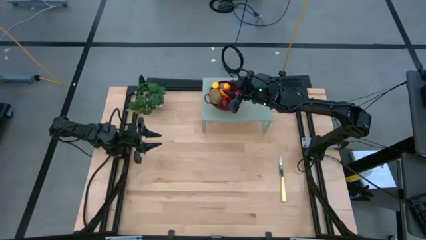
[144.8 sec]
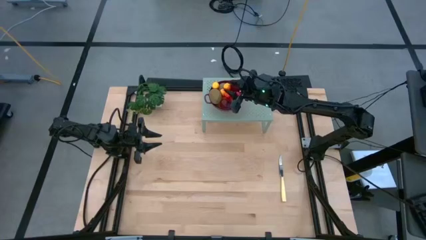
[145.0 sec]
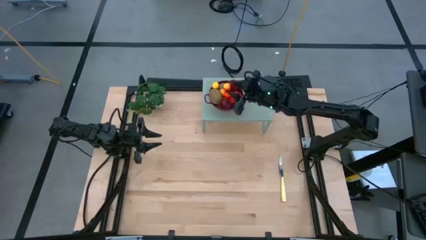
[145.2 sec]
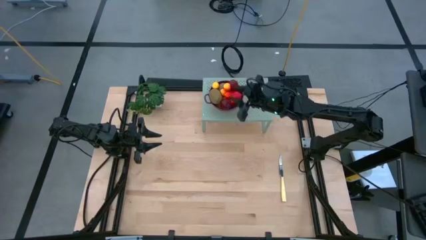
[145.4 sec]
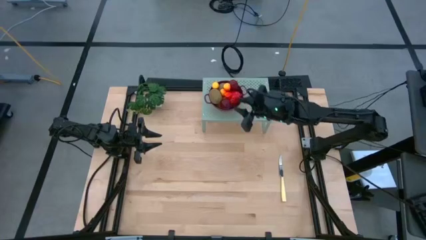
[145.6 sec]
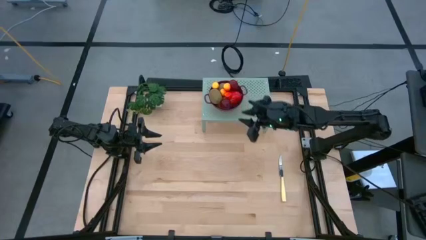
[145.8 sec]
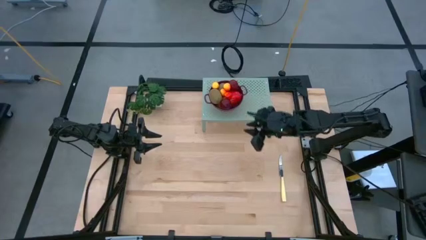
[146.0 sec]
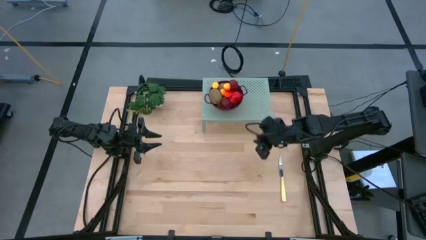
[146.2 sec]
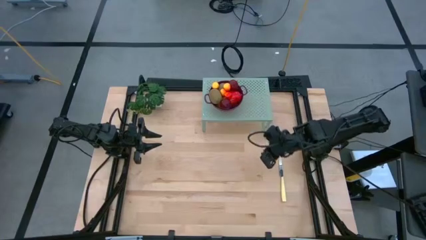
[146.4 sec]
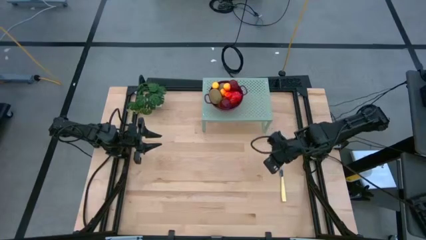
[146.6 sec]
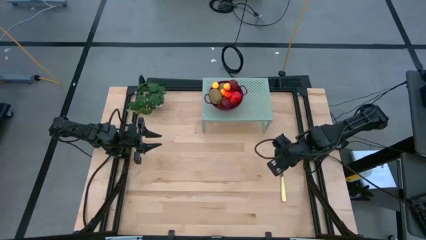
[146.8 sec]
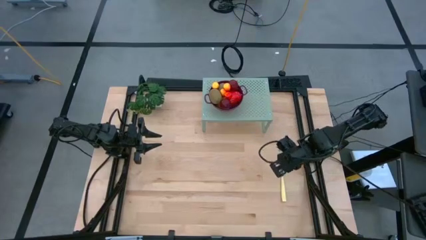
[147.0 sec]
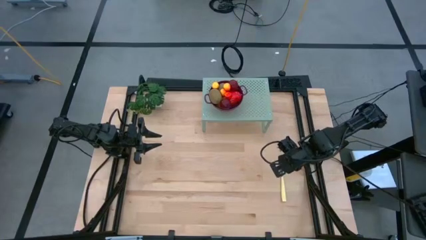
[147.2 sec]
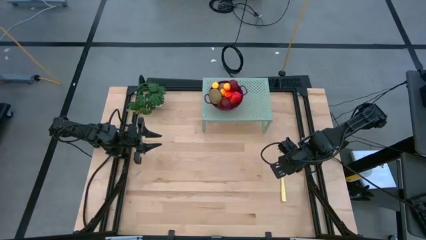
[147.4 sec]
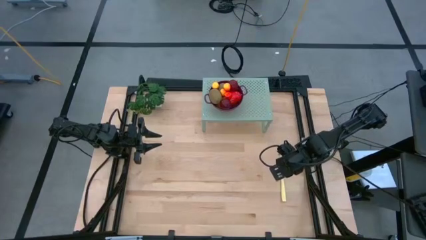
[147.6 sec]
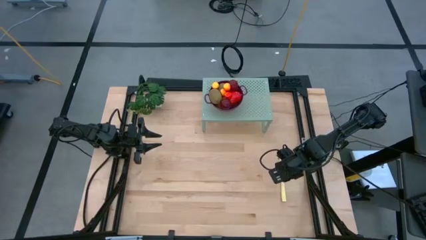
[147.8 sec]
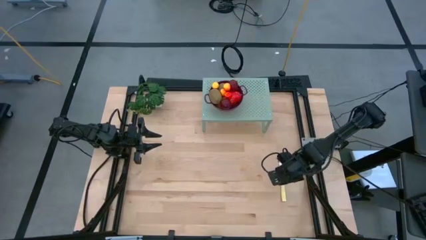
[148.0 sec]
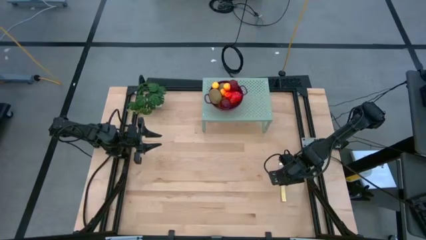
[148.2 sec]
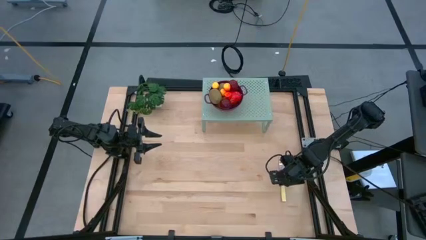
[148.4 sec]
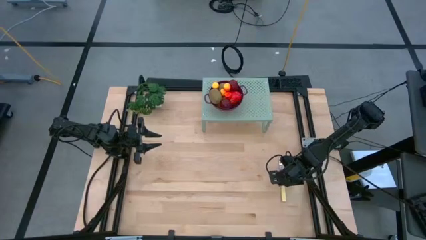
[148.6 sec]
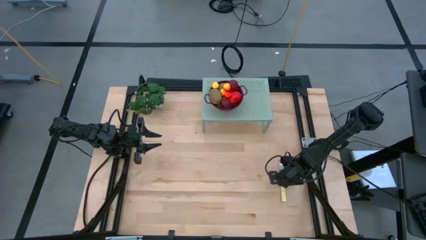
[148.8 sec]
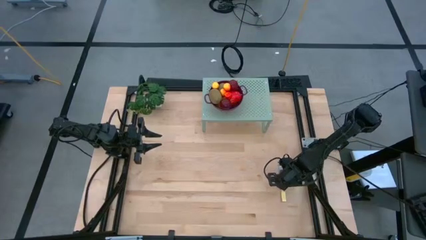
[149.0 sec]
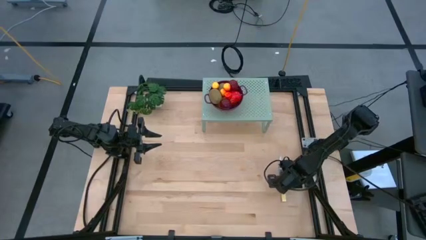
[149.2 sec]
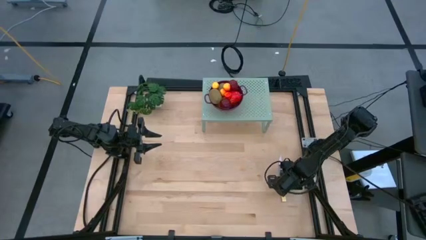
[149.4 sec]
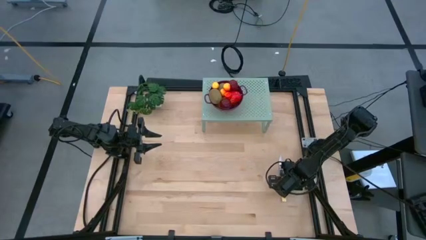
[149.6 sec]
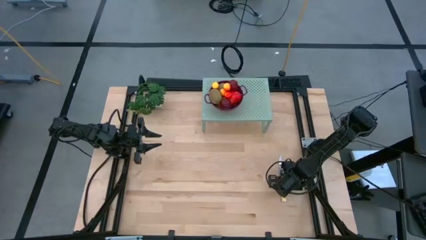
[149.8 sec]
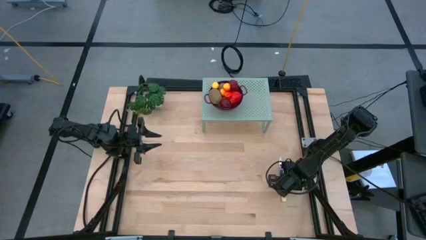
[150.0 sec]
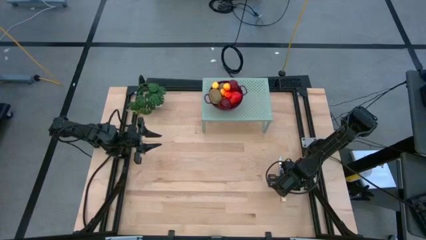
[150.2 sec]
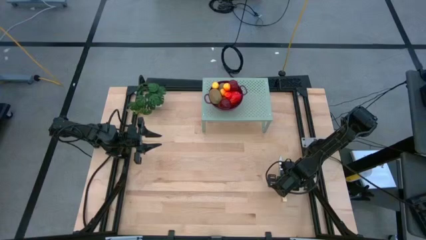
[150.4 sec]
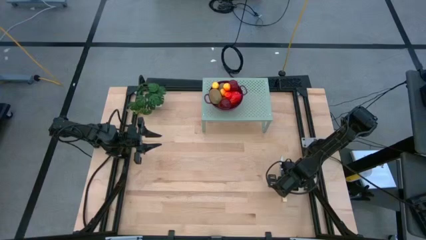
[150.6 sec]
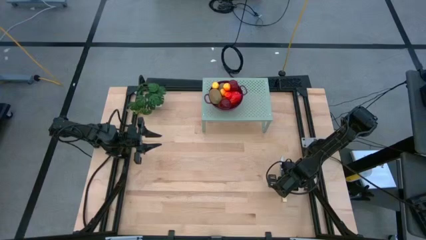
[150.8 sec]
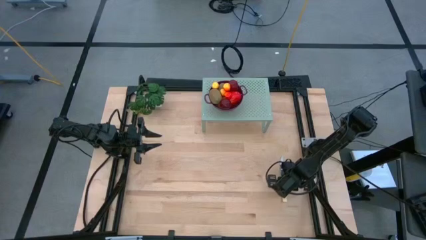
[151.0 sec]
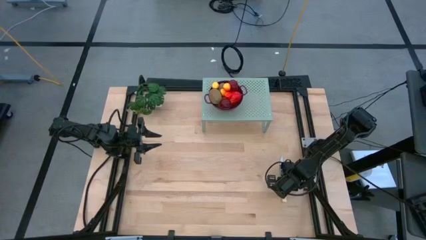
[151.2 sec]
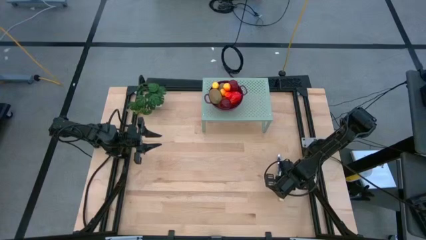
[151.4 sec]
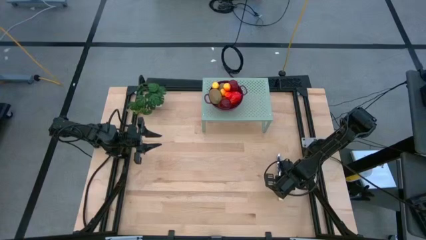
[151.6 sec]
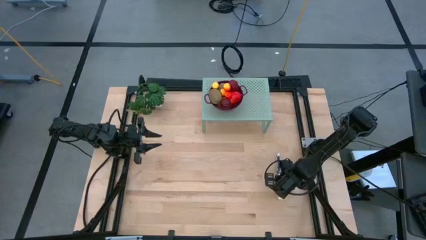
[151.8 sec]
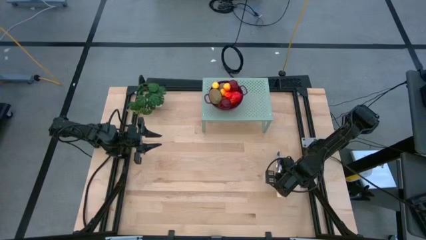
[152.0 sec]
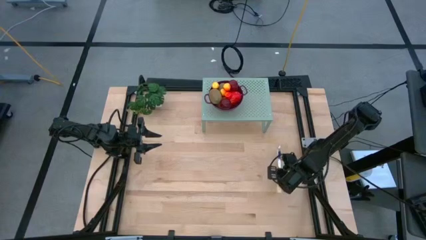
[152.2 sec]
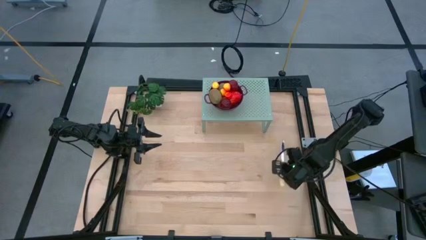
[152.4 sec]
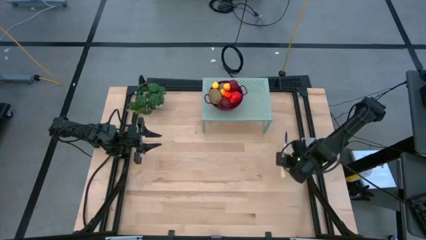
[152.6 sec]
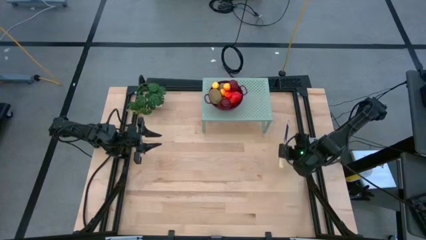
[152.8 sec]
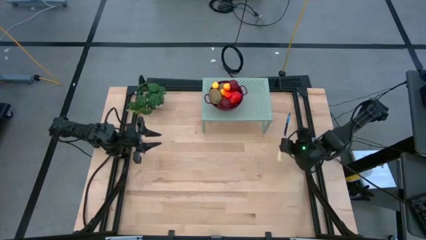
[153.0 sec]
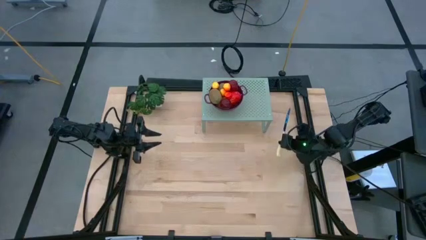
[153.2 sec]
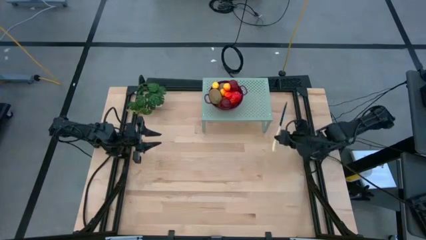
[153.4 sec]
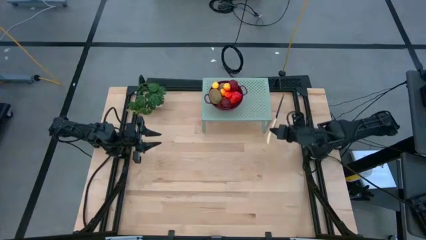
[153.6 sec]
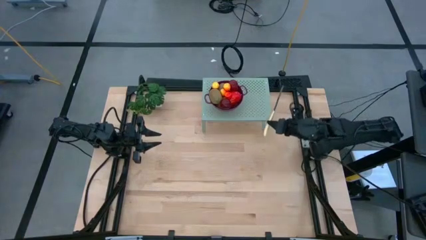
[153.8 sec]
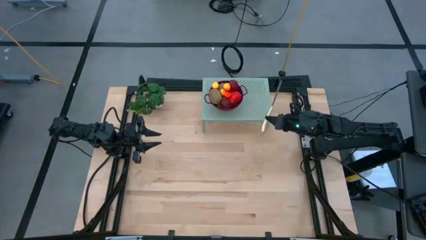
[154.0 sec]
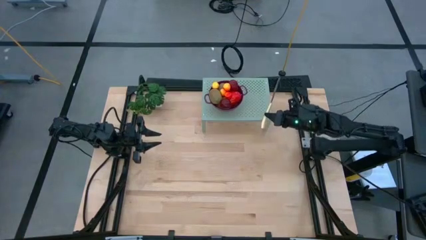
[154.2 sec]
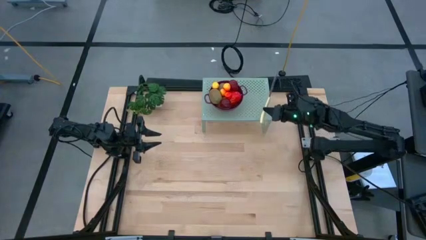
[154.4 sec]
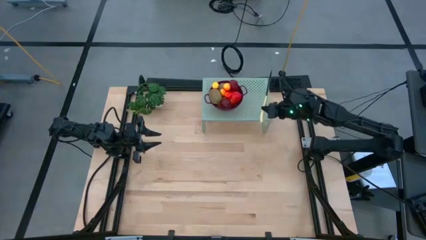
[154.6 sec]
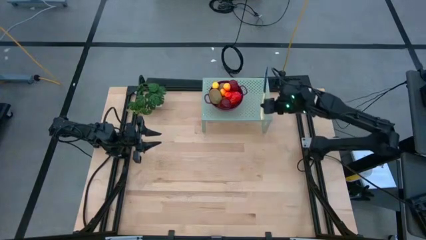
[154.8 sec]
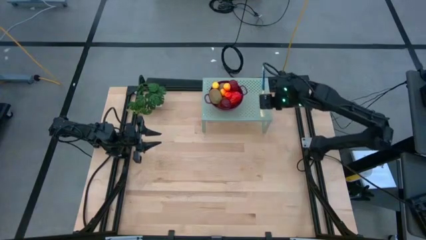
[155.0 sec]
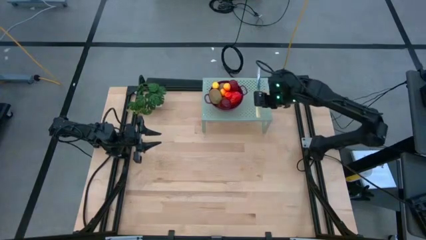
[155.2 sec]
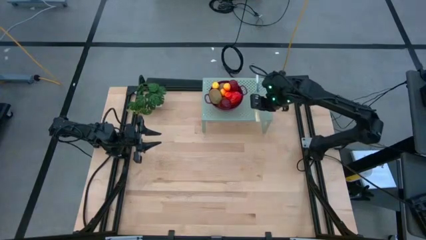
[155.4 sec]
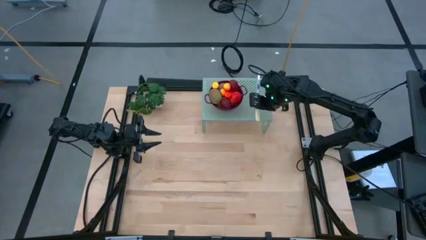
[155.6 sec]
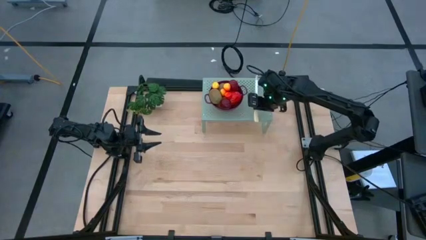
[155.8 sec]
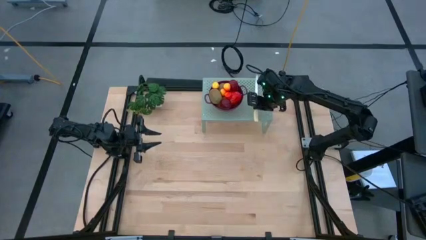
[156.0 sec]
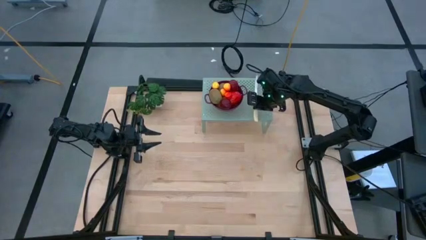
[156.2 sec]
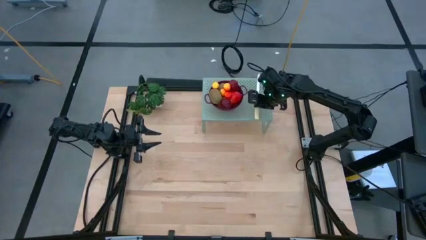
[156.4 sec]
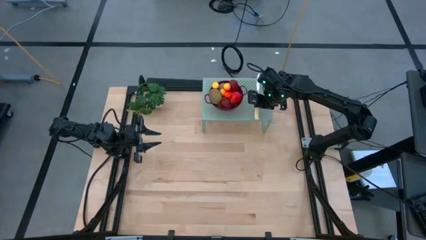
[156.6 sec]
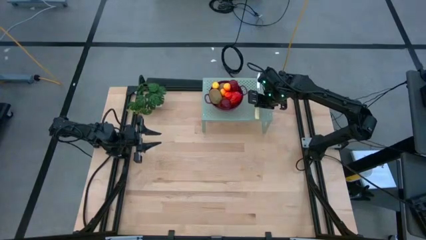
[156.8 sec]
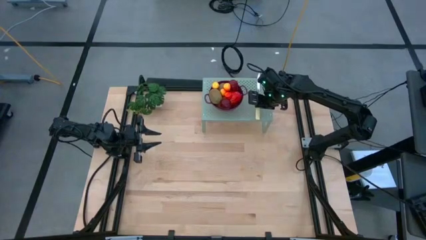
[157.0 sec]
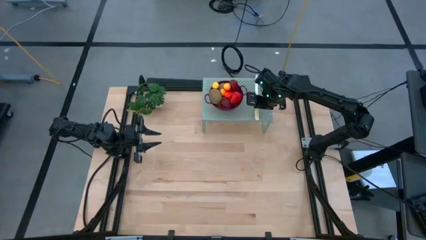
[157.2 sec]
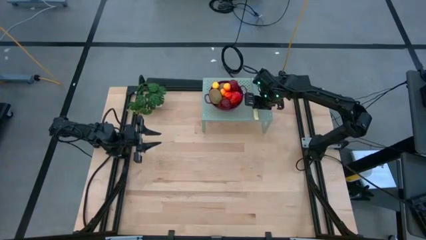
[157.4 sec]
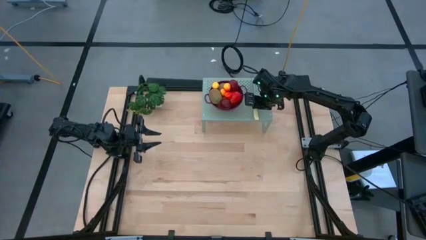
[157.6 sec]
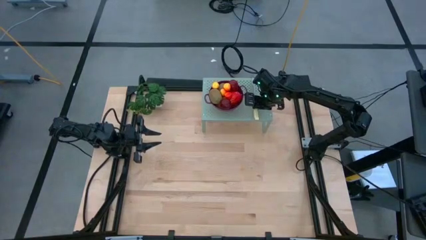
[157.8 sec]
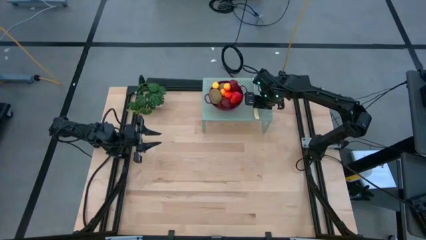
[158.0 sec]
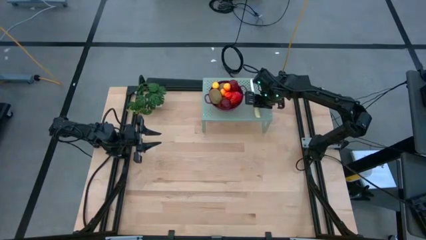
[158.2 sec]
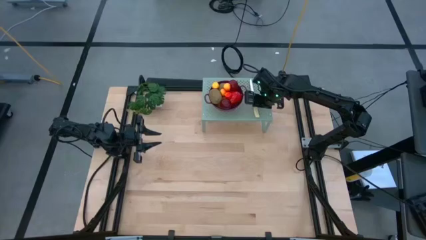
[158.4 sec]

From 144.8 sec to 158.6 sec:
Task: Pick & Place Fruit
Put the table knife on the shelf

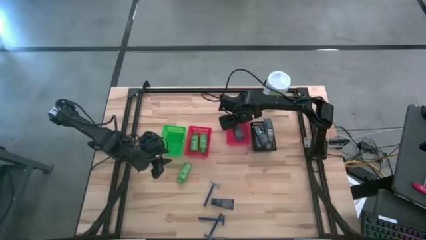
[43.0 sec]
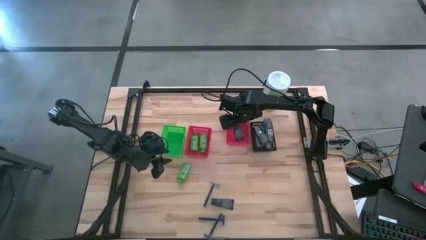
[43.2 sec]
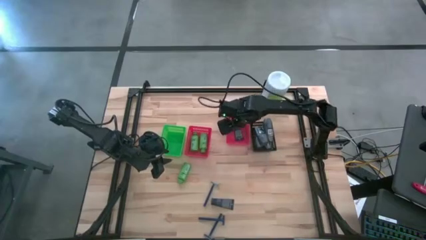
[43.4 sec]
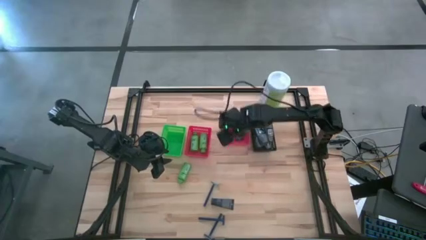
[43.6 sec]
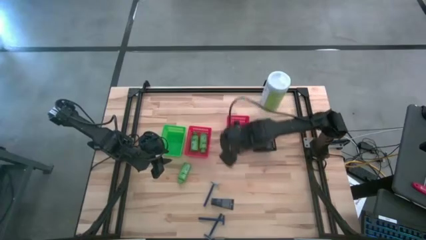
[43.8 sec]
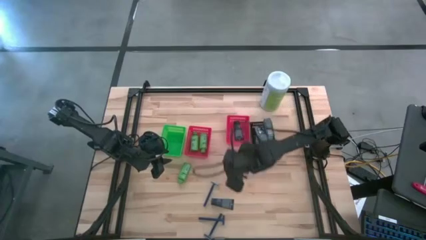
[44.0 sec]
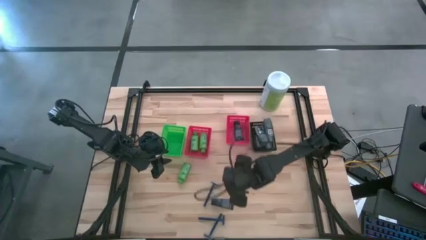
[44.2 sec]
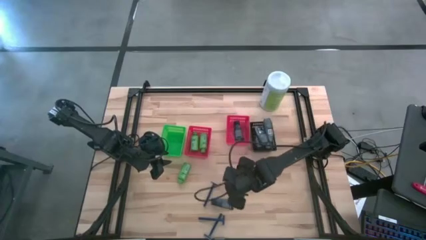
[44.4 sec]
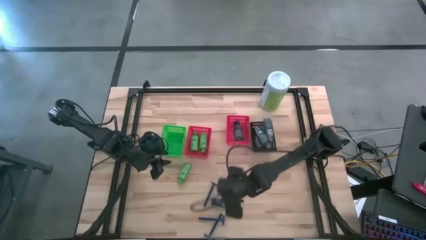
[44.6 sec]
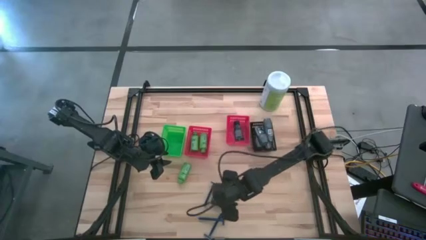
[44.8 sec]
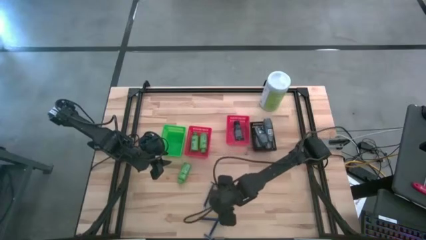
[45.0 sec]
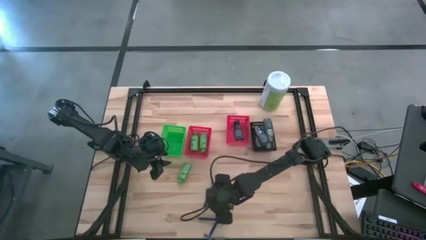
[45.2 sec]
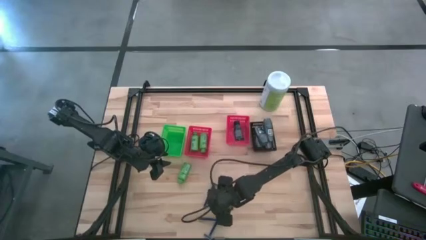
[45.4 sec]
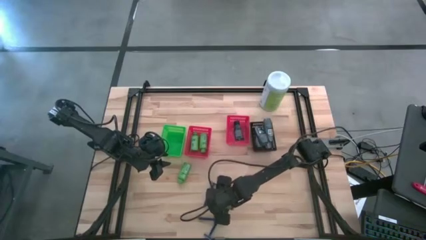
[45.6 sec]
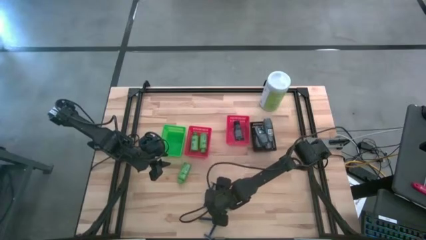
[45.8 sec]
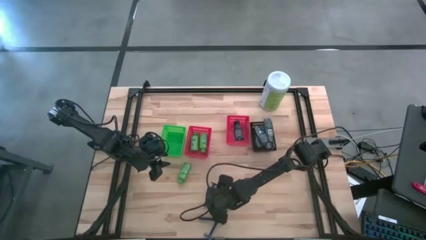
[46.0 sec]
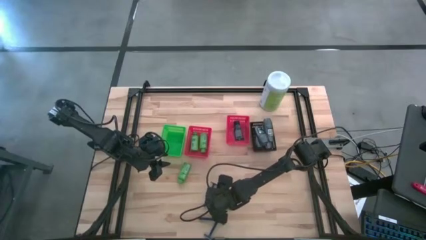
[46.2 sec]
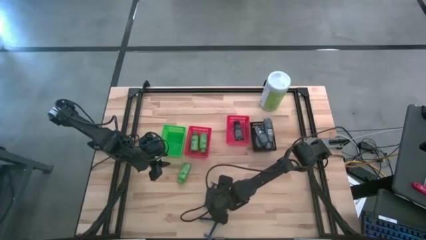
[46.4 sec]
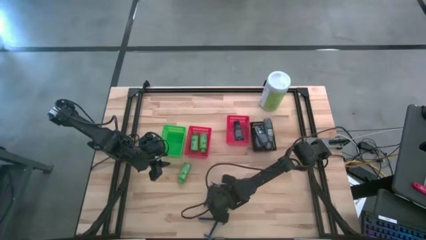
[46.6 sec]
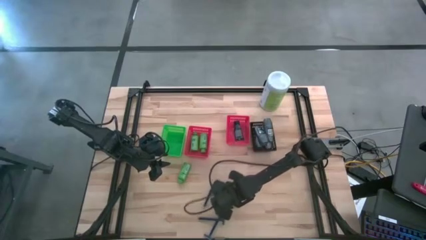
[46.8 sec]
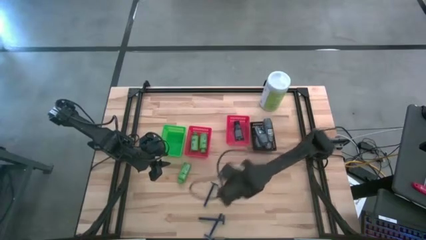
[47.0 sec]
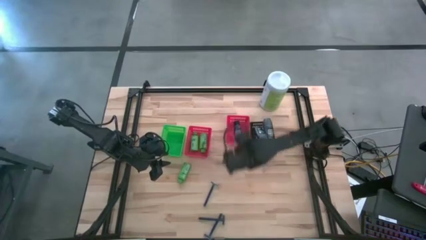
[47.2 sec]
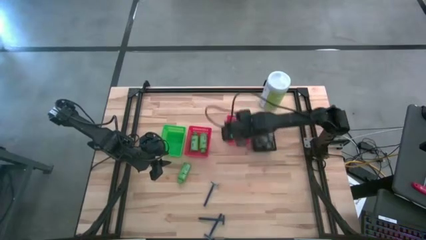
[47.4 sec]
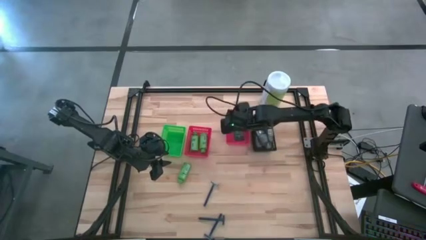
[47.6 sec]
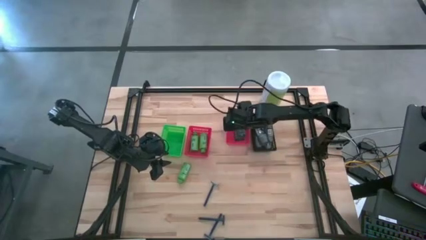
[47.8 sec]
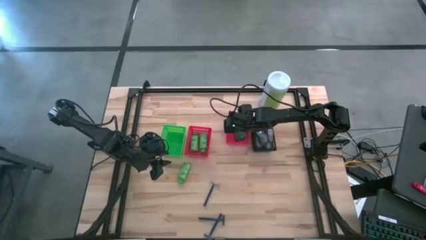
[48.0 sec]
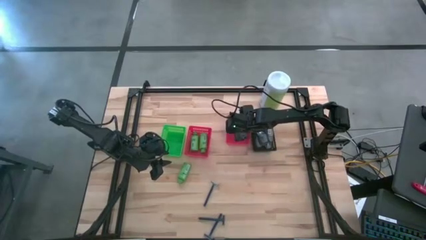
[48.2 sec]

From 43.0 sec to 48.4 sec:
Task: Pick & Place Travel size toiletries
Put the black shaving cream into the right red basket
